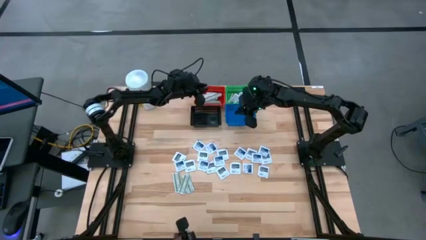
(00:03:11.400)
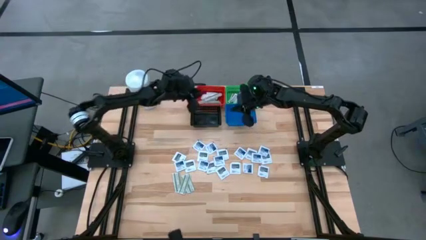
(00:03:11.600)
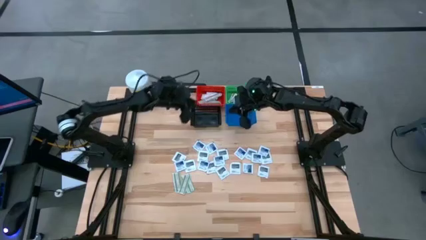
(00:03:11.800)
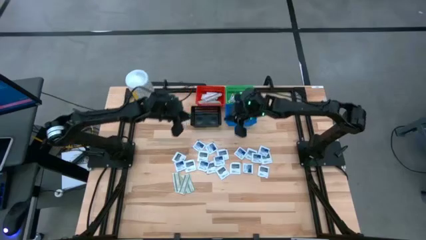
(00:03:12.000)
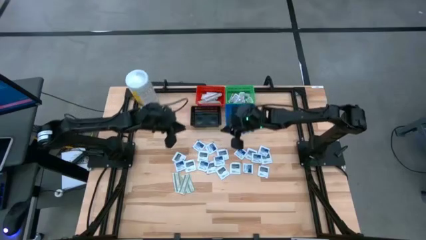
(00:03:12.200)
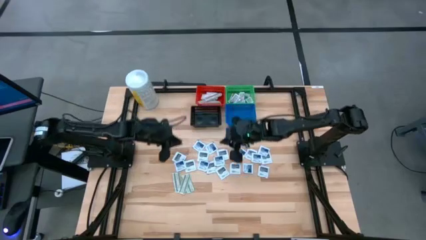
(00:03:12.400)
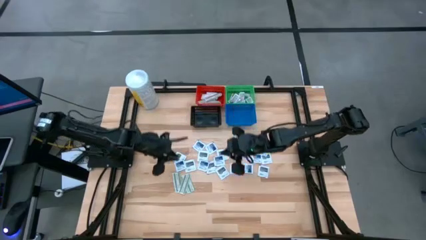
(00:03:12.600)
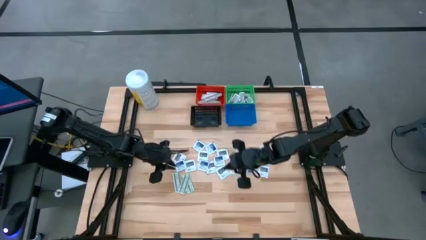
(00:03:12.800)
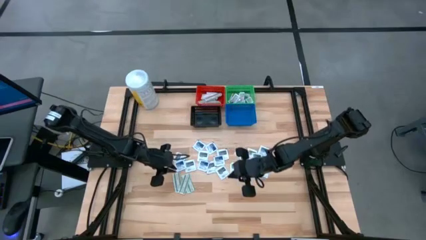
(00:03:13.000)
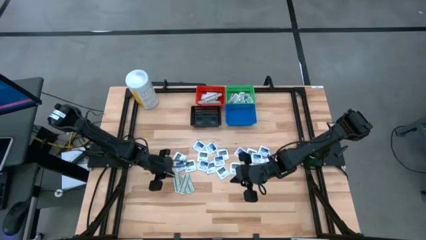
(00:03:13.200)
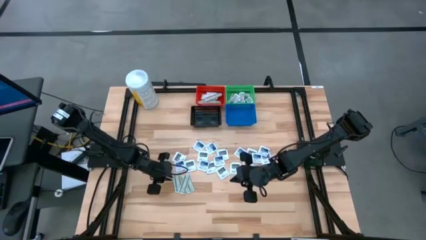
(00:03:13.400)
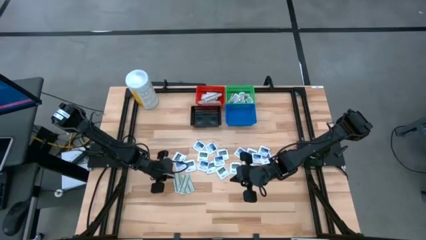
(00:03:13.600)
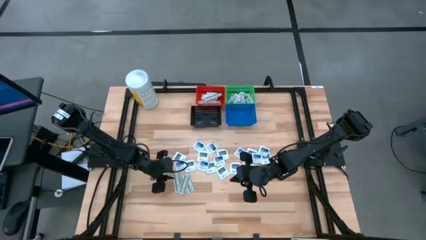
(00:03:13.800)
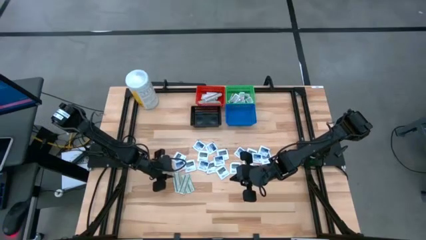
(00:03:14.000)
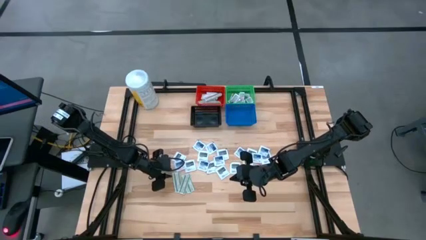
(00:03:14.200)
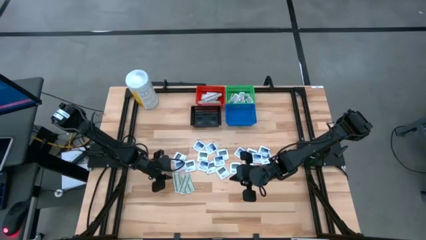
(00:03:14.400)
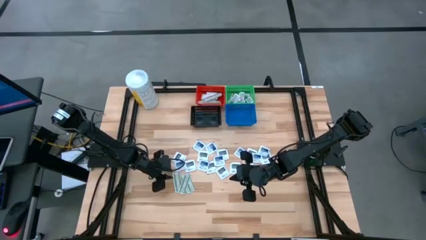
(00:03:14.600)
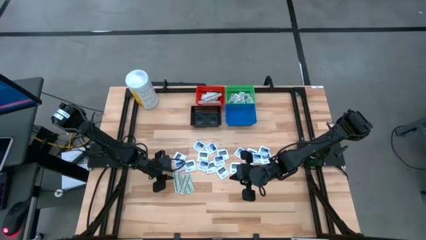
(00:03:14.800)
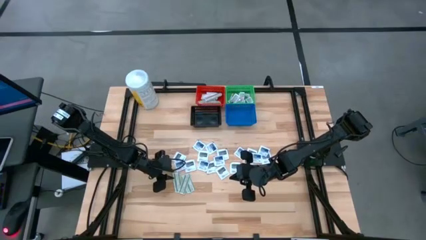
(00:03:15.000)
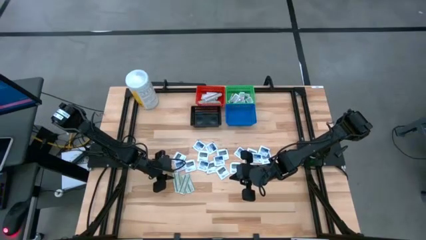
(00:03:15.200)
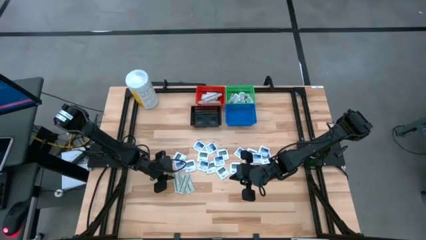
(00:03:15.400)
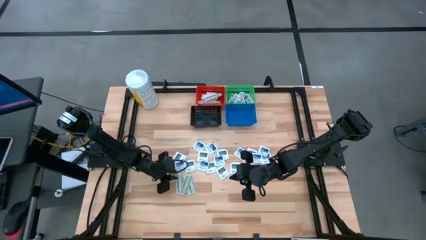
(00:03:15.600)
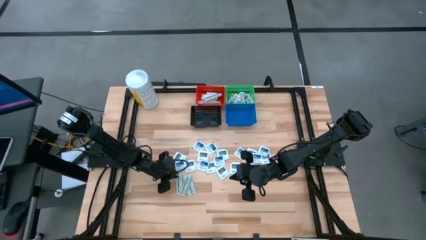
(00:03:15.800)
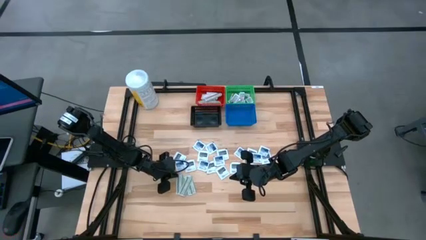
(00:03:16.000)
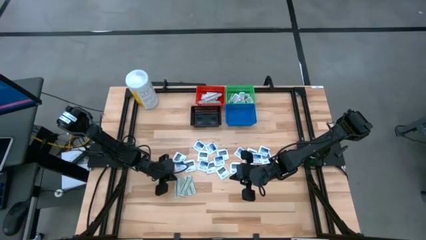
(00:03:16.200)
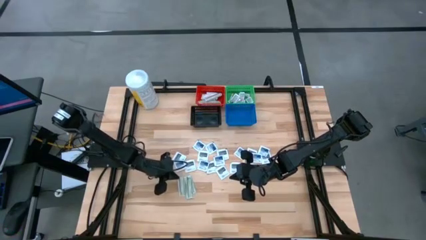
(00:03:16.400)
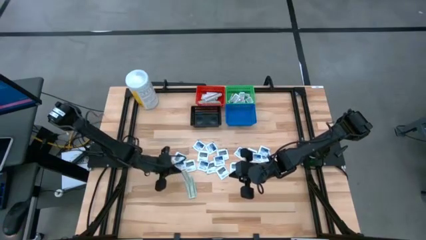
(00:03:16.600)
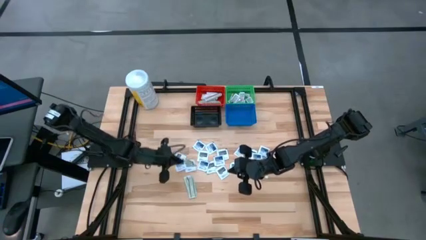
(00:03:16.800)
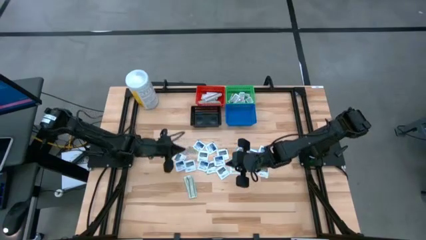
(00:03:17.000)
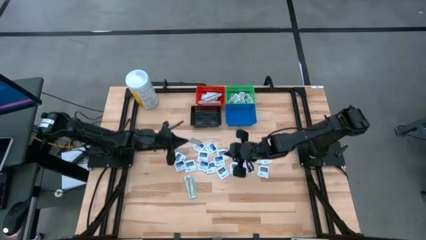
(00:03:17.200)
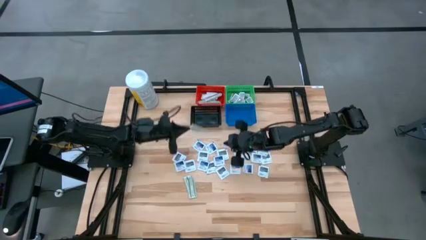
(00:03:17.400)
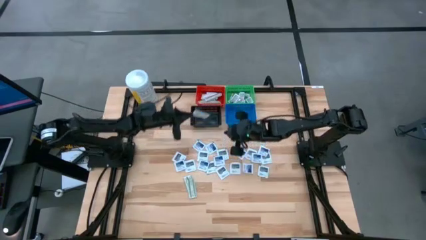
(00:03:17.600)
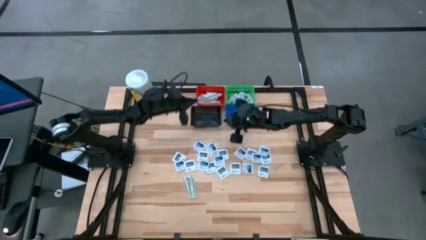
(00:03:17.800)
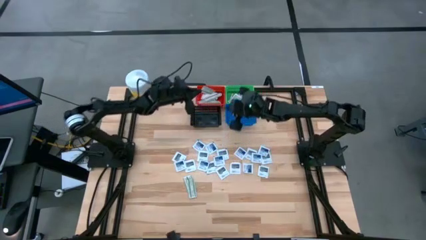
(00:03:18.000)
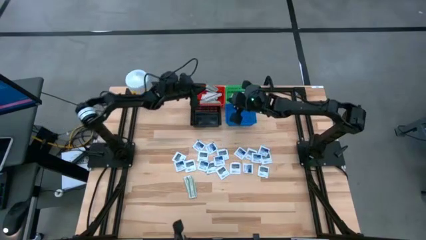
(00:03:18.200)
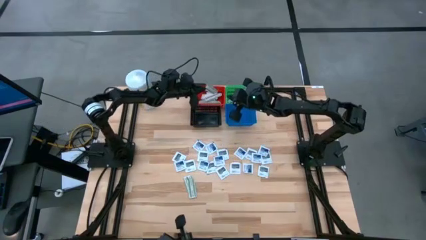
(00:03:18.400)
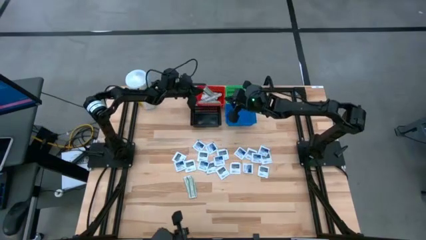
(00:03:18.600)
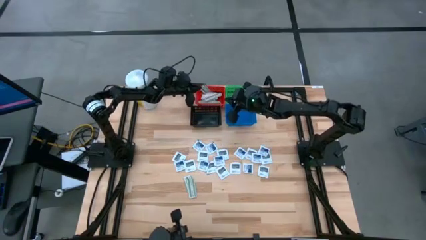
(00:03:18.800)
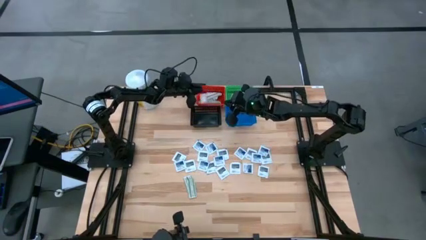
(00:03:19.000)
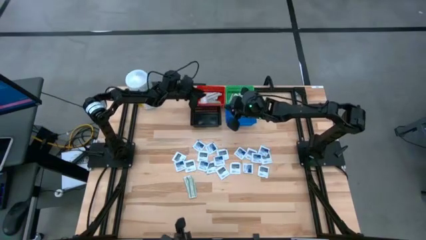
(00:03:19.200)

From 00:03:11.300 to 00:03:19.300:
Task: Pick & Place First Aid Supplies
Put the bandage into the red basket

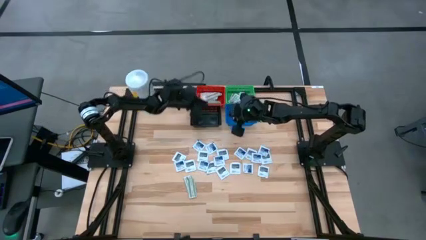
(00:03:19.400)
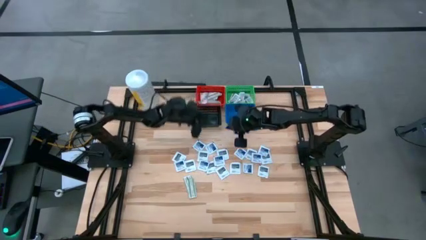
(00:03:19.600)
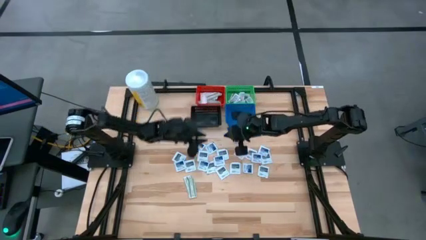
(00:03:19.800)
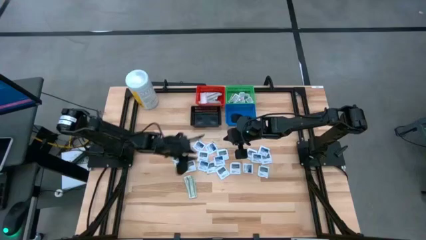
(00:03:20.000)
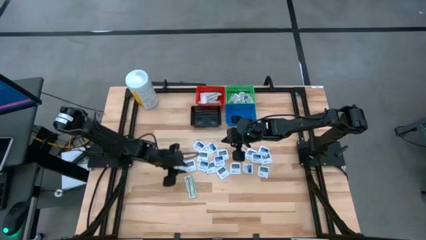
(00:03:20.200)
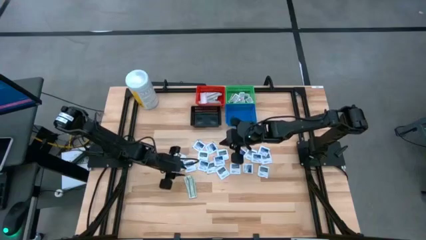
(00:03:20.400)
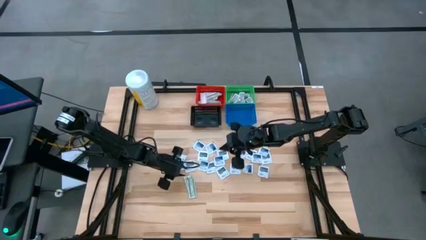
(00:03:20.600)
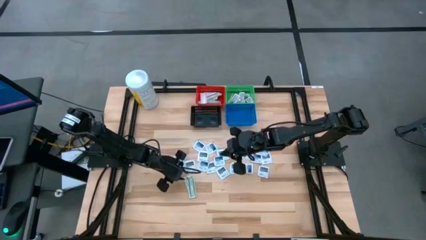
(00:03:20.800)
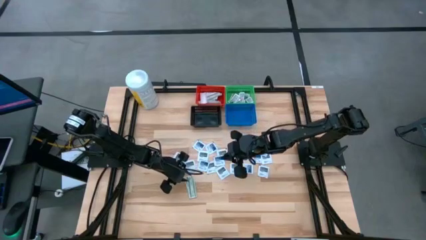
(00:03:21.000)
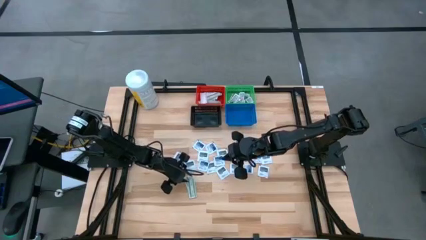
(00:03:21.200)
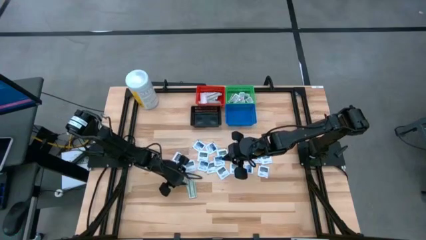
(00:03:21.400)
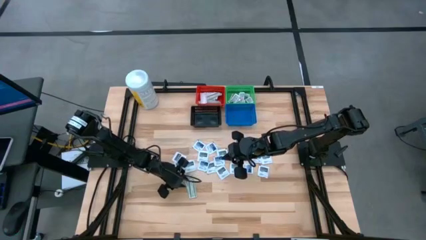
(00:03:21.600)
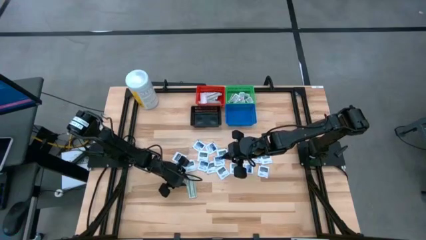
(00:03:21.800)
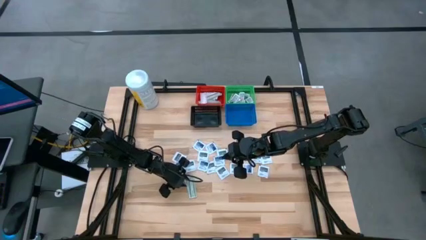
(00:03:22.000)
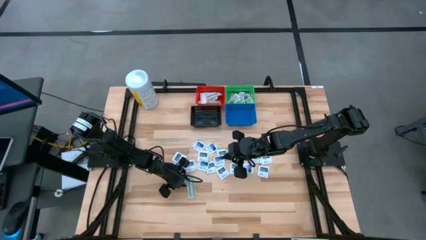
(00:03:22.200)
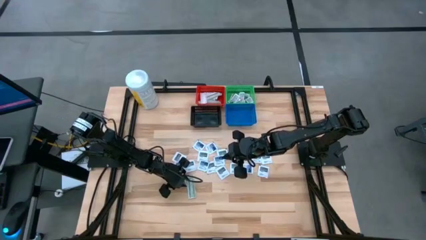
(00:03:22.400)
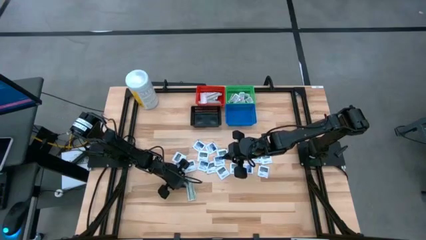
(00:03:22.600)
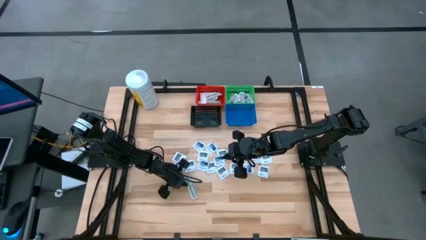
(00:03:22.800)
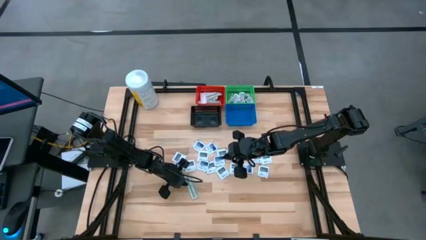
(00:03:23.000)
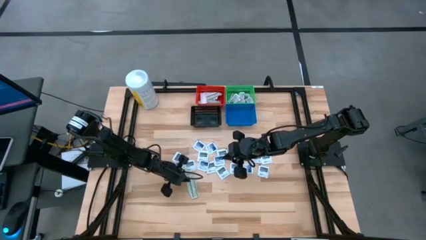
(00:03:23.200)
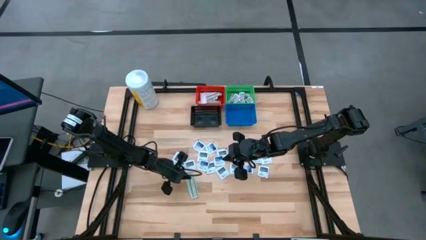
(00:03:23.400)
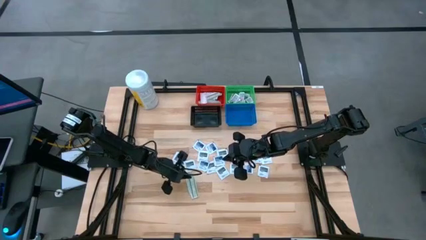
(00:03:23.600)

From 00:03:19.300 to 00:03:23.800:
Put the bandage into the red basket

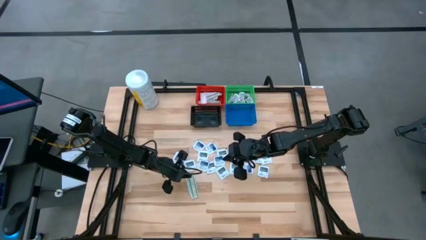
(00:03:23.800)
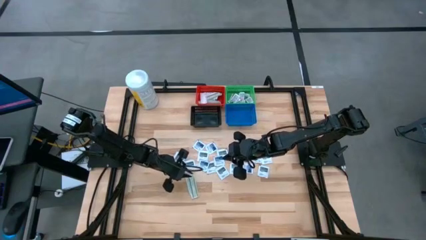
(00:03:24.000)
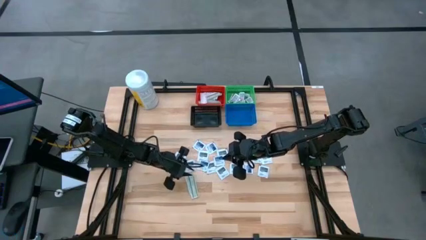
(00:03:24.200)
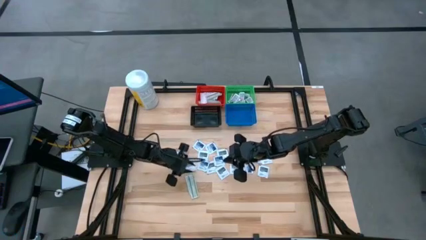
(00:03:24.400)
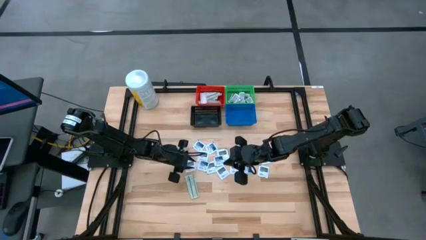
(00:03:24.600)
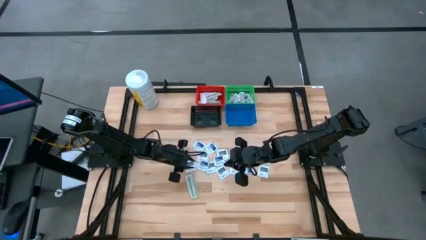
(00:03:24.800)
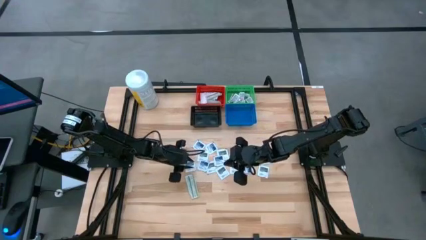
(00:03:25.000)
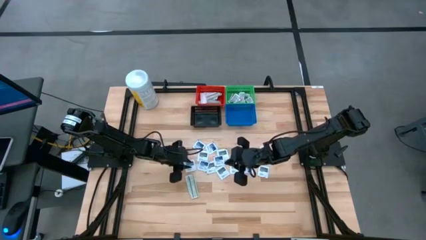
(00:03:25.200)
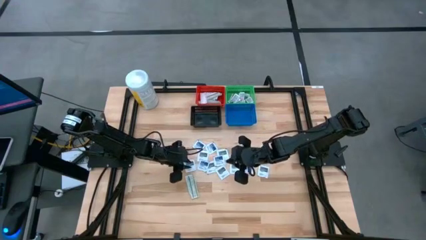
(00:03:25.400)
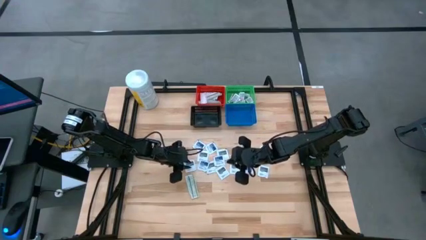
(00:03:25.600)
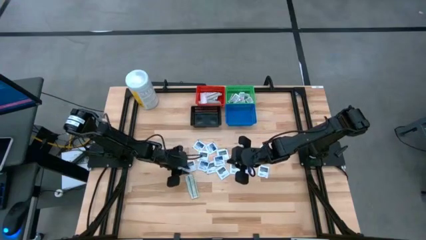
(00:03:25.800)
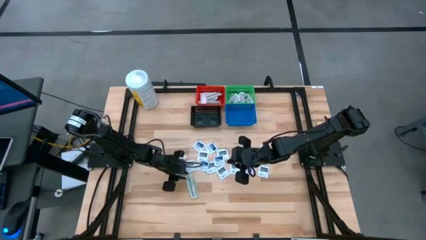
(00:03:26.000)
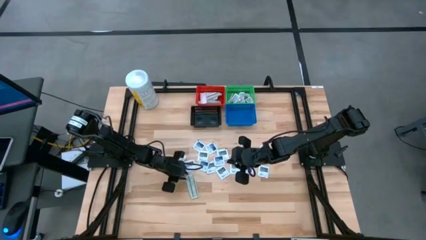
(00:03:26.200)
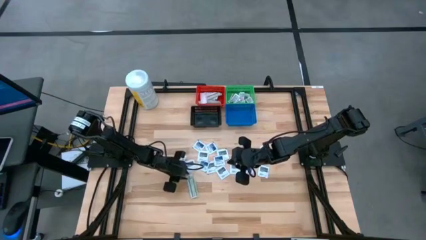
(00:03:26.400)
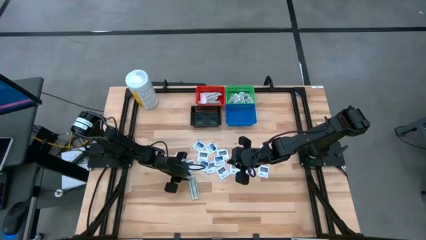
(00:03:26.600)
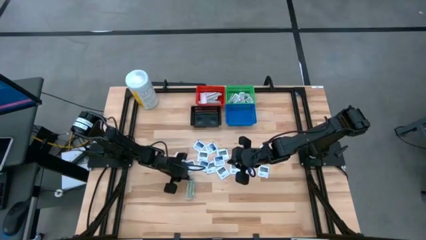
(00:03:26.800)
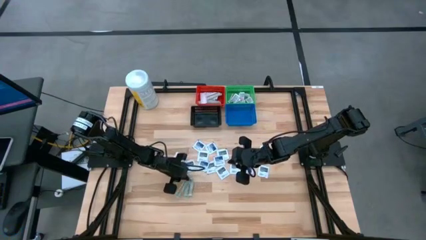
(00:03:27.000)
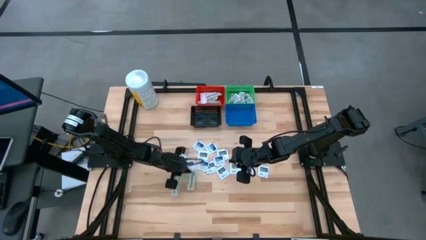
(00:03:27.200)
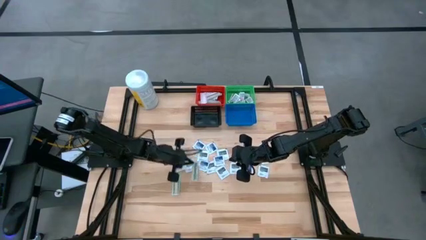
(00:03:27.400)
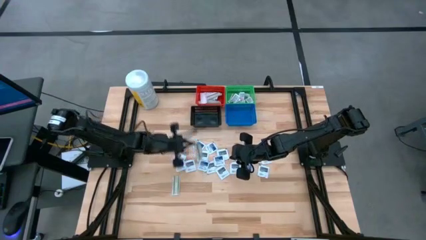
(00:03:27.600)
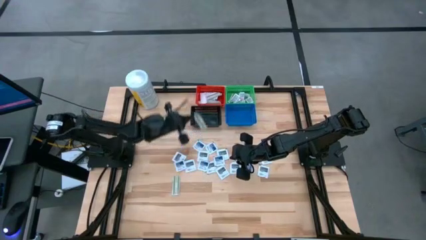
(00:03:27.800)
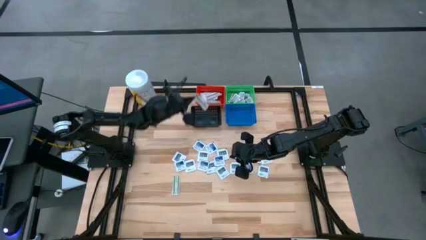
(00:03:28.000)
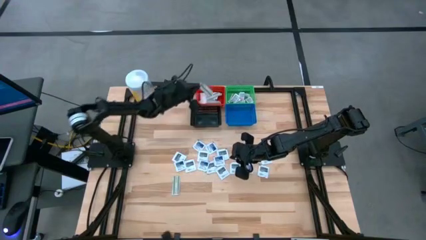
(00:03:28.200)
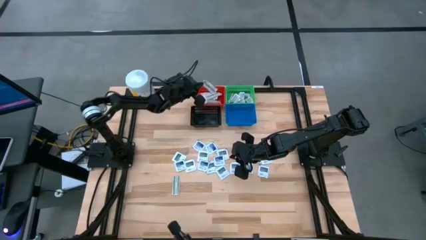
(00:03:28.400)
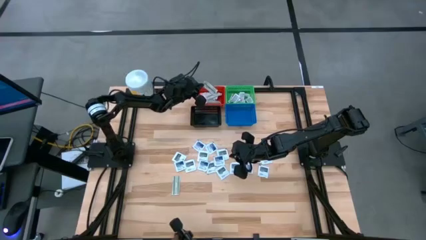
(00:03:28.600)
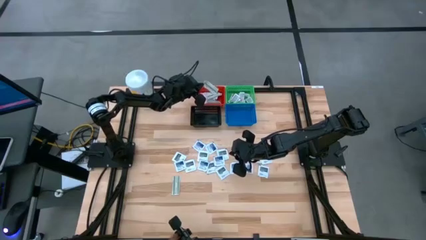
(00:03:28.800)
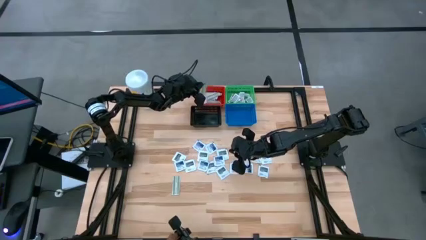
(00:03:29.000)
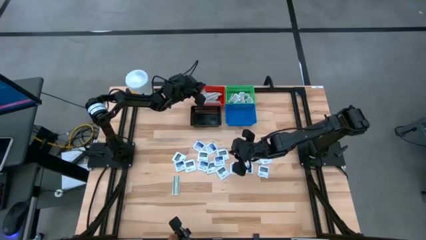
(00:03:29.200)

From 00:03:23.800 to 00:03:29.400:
Put the bandage into the red basket
